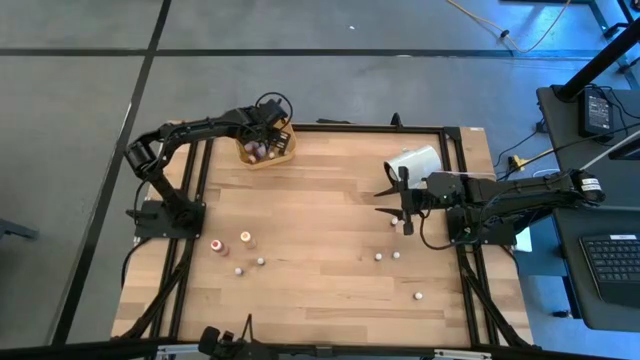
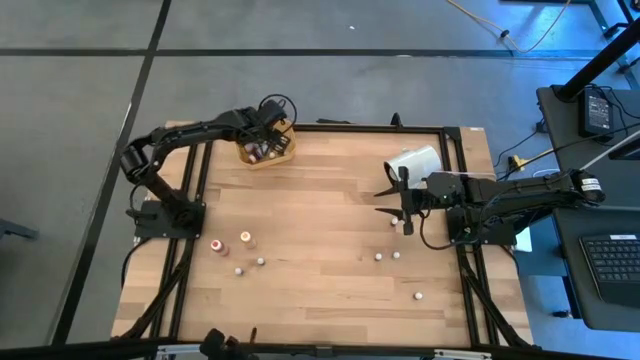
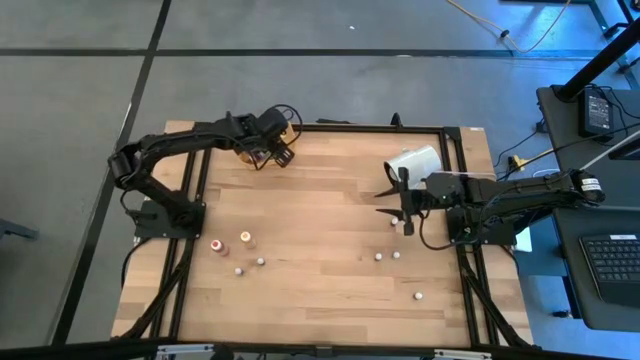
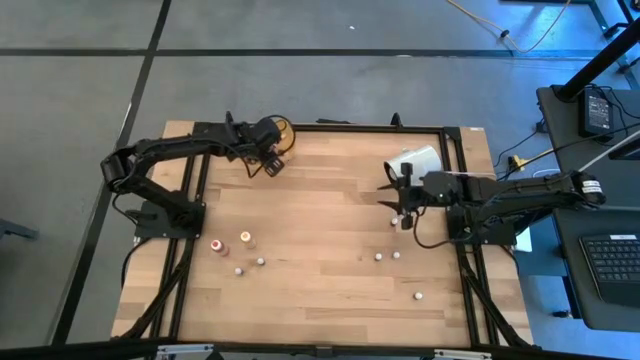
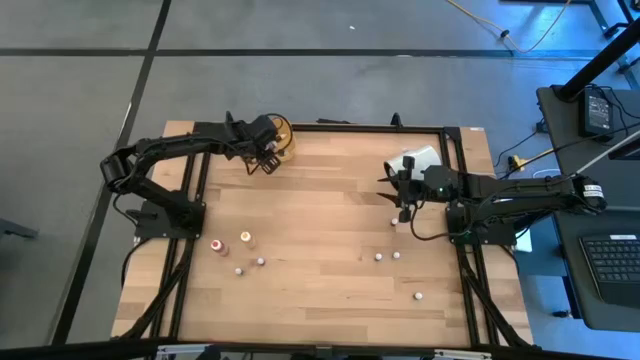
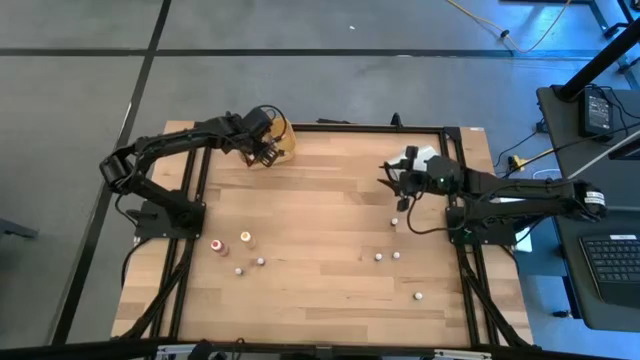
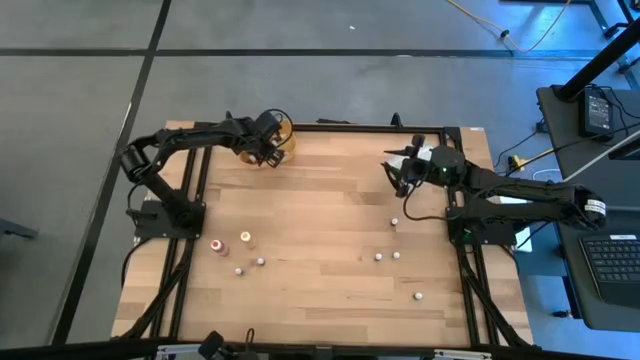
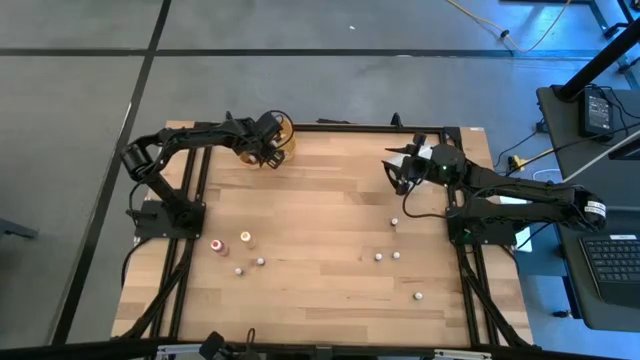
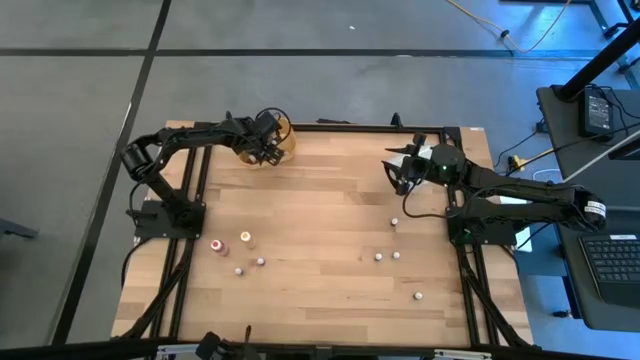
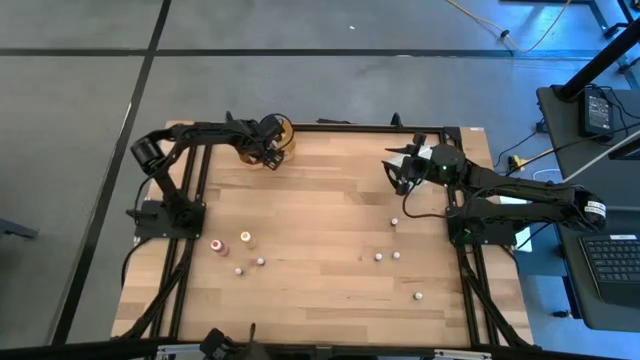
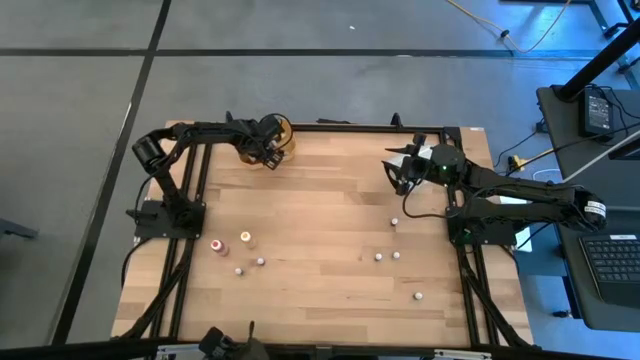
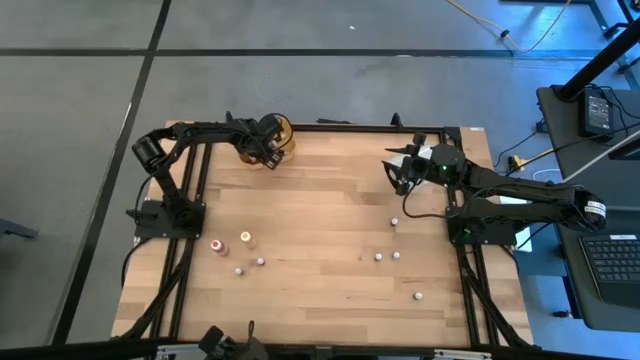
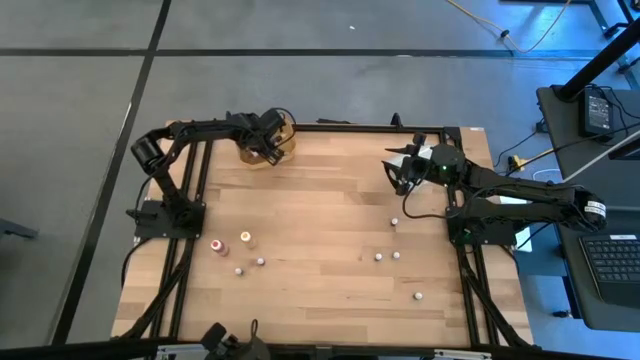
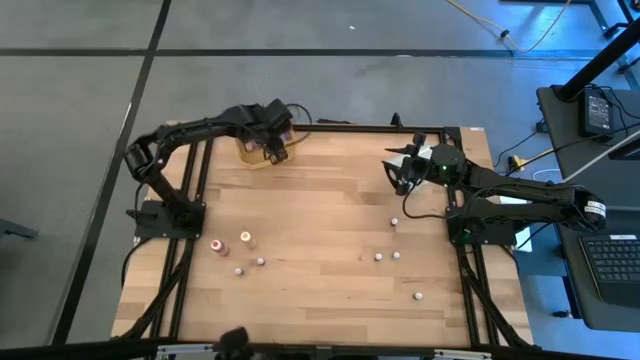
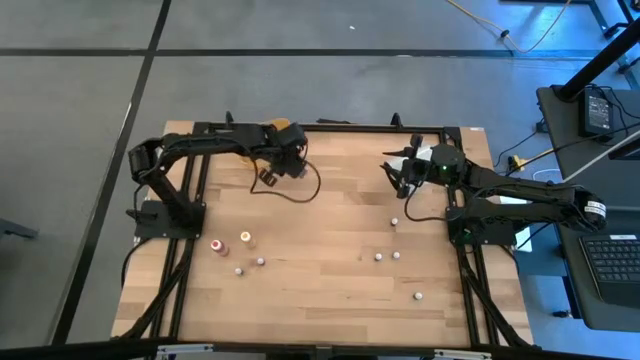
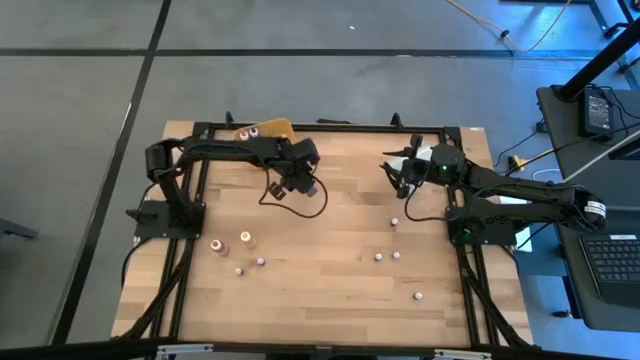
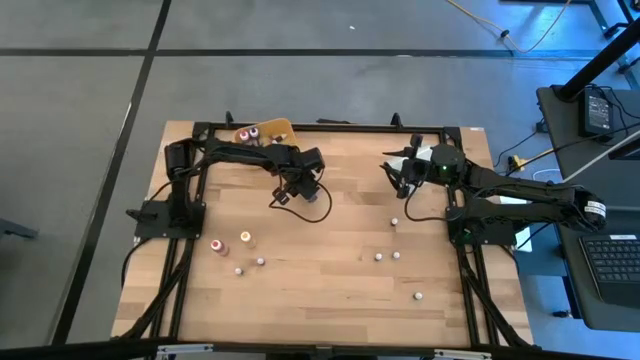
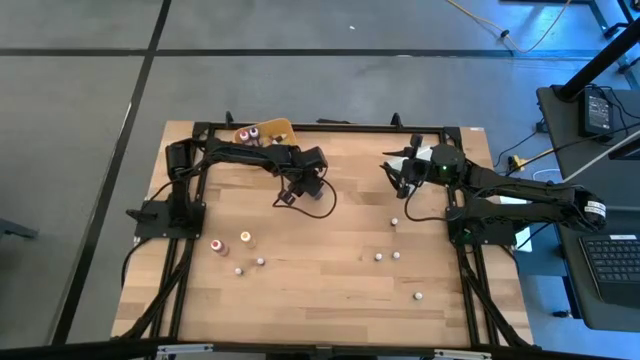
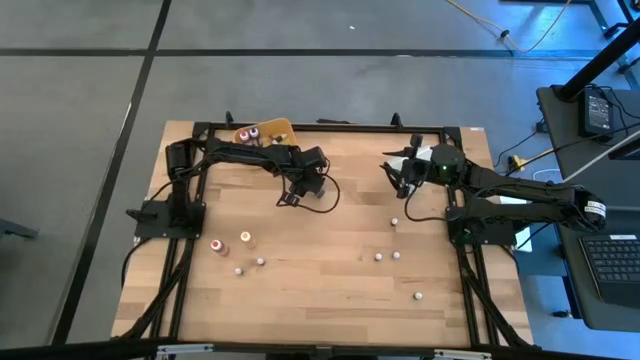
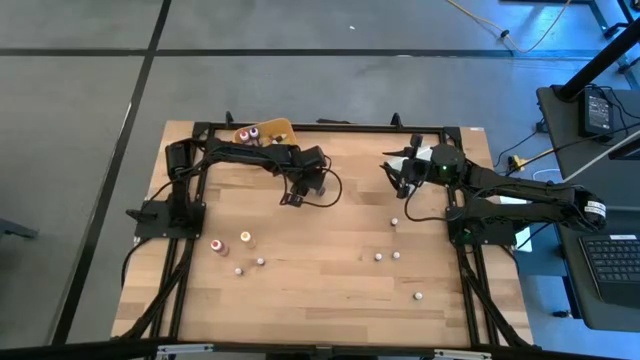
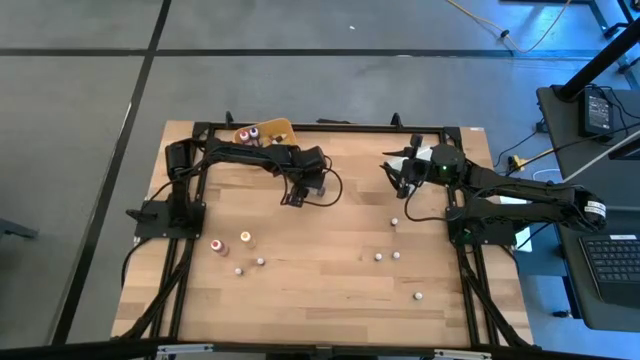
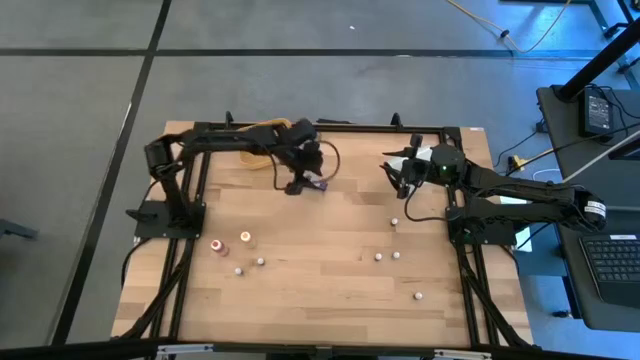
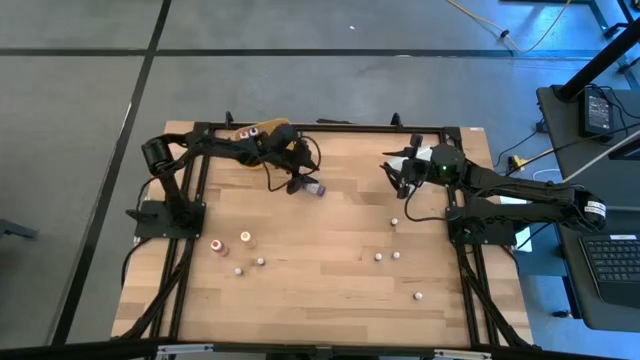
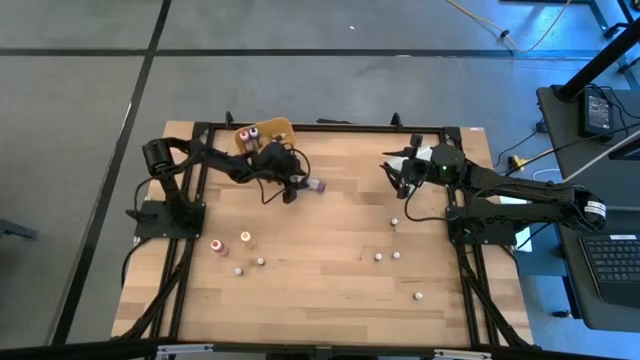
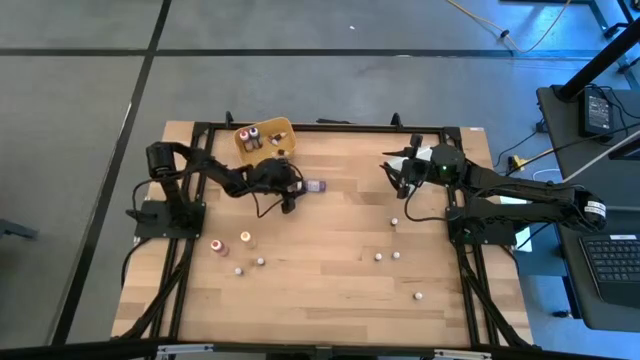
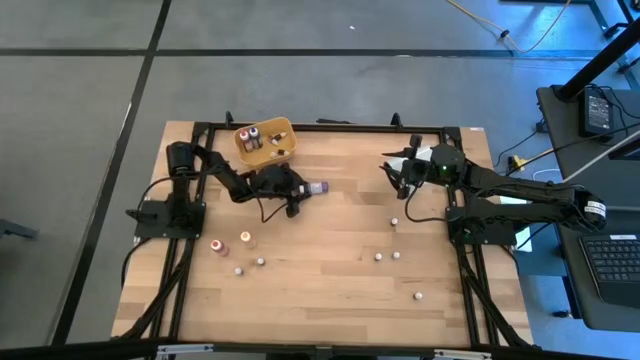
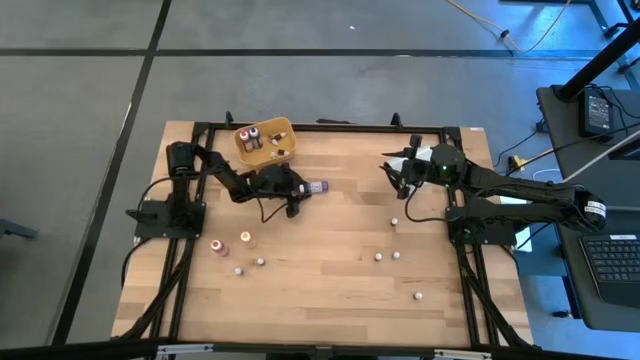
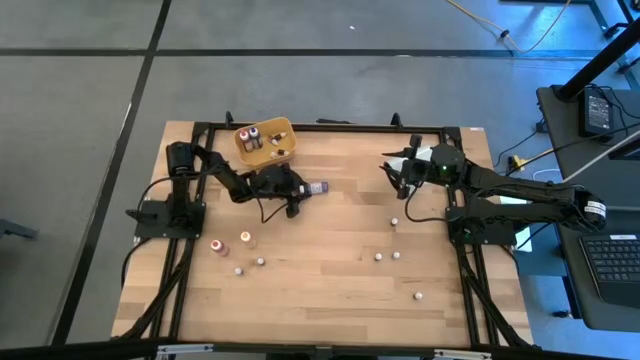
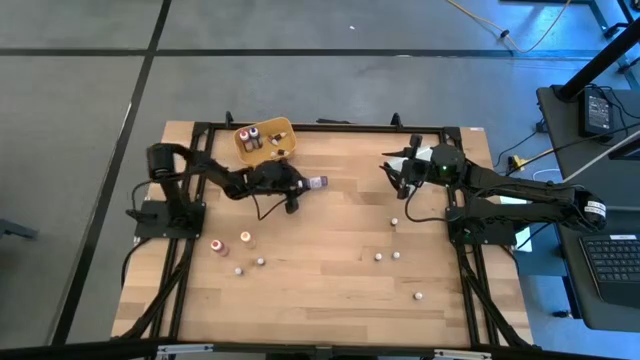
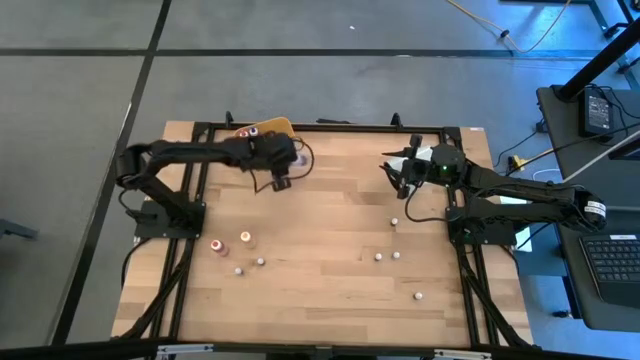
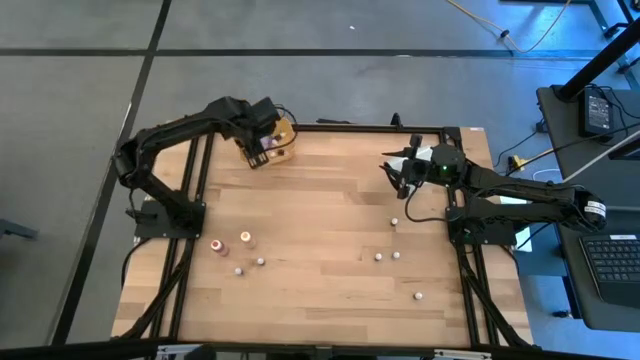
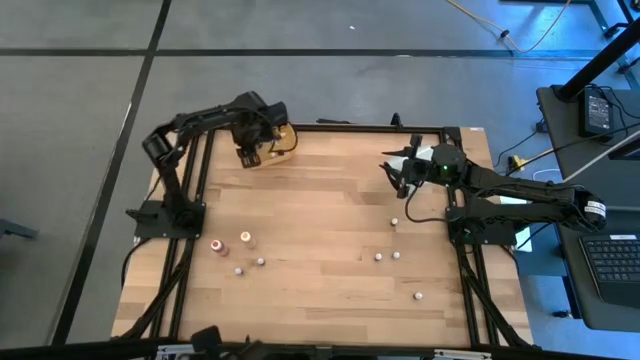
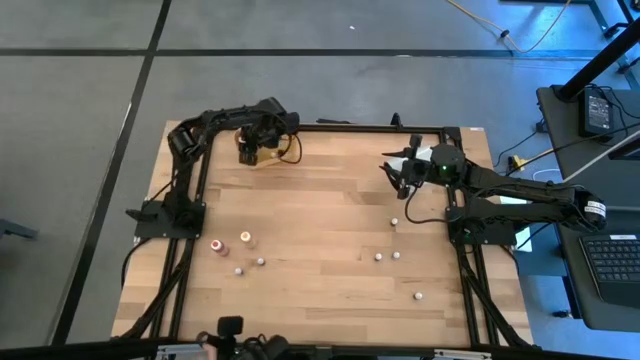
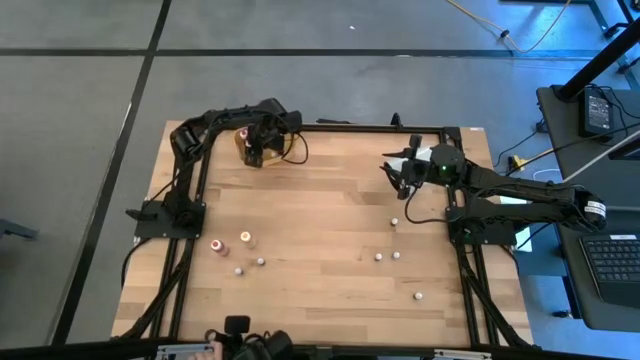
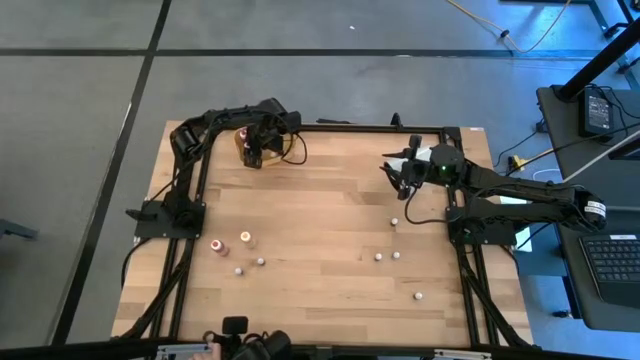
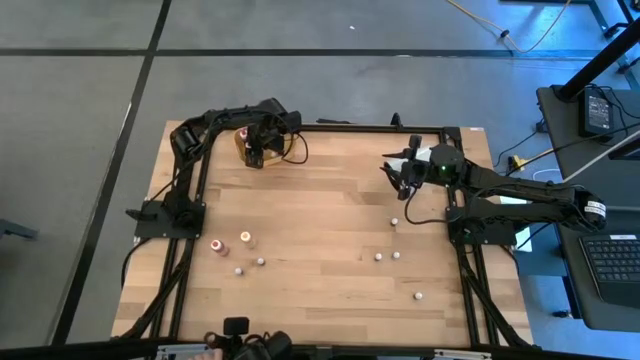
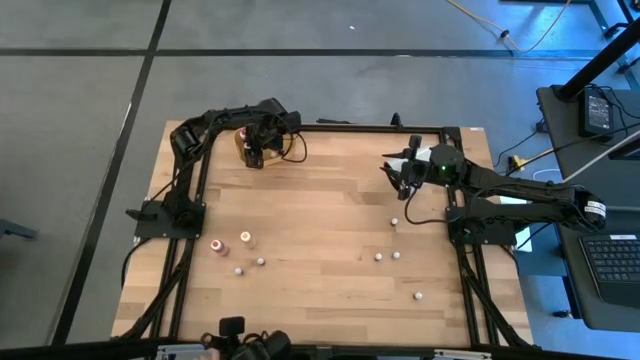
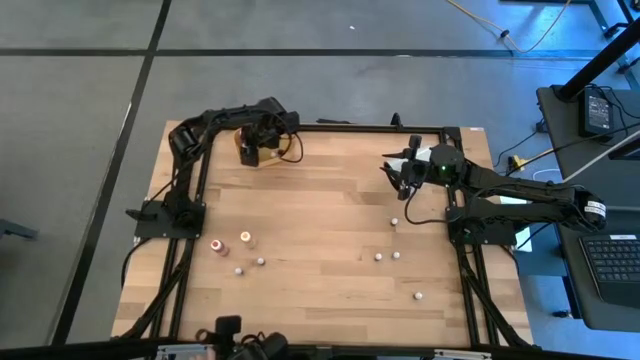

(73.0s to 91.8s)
Task: Pick & Place food coloring
Put the large purple food coloring bottle into the yellow bin

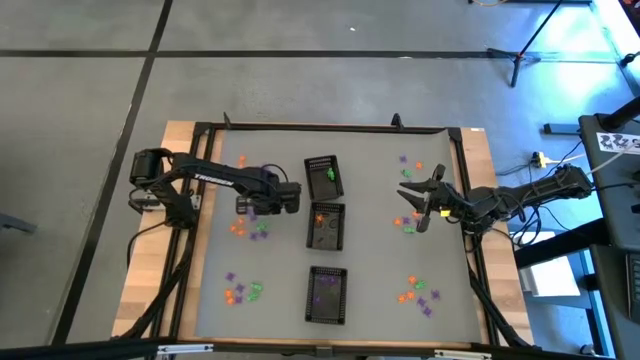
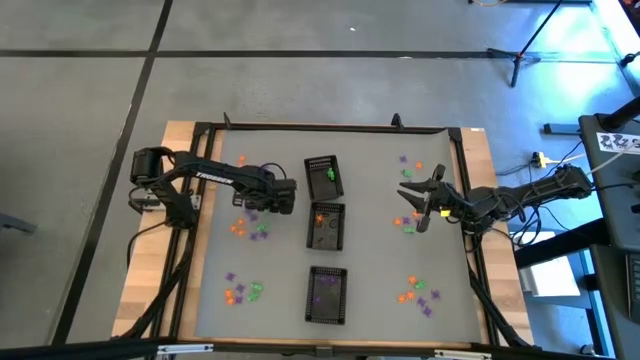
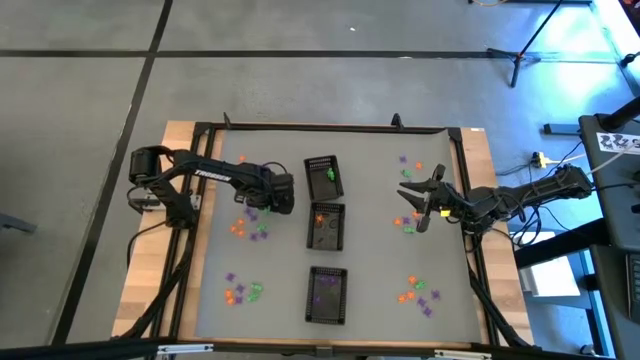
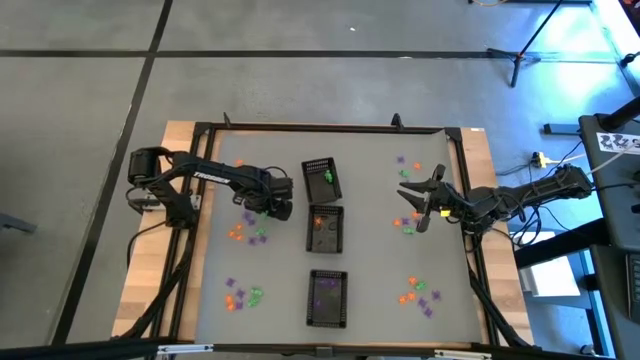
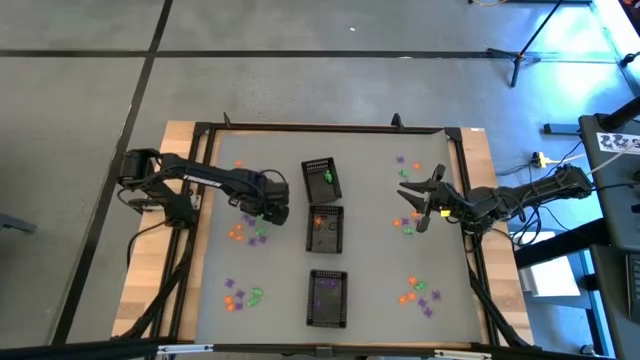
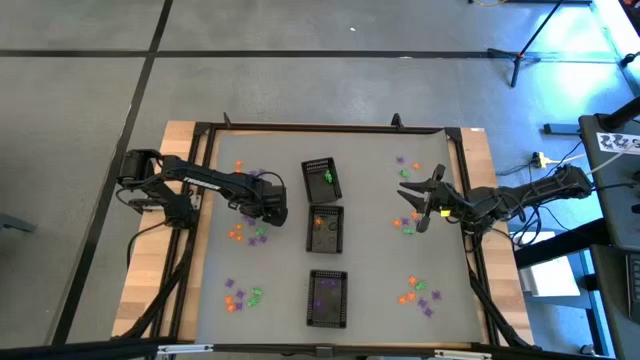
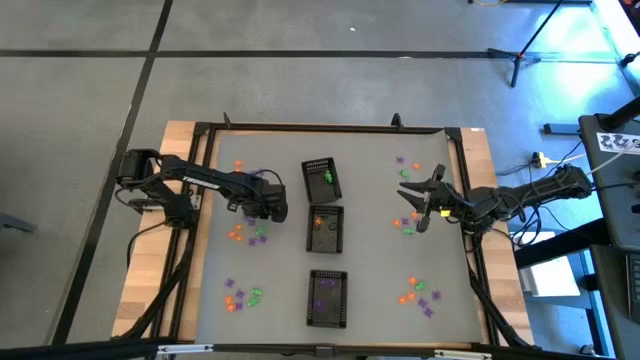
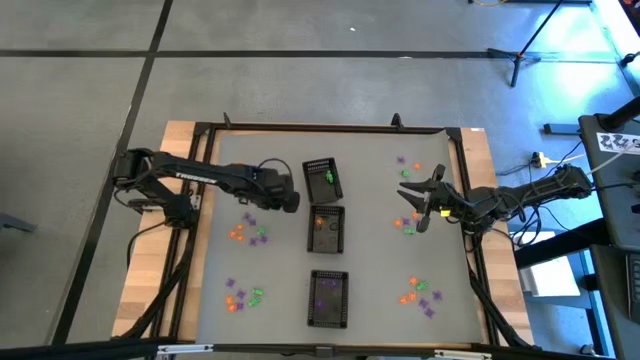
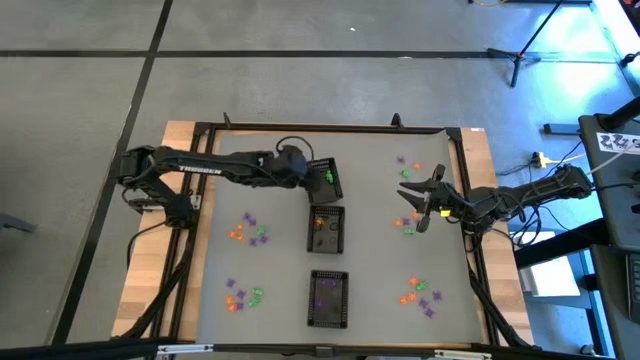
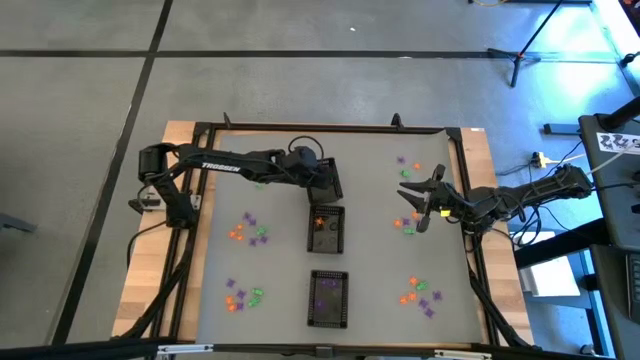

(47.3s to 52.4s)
Task: Sort Halloween decoration
Put the green skeleton toy into the top black bin
